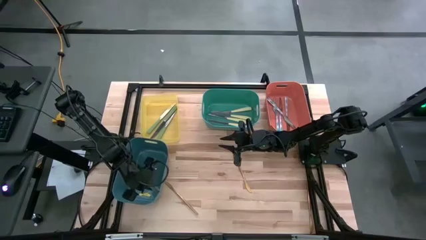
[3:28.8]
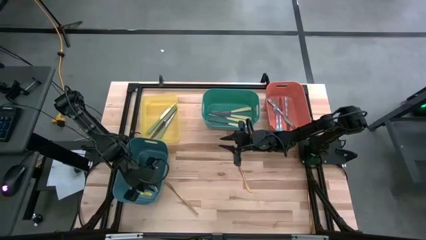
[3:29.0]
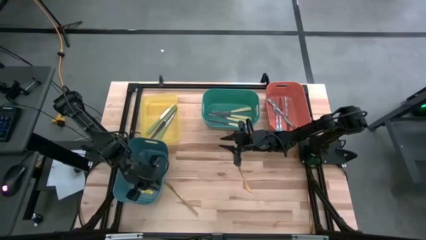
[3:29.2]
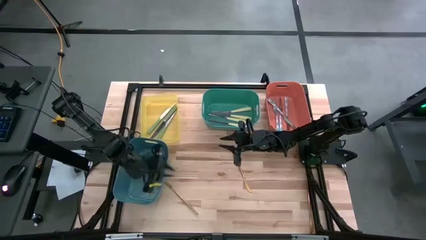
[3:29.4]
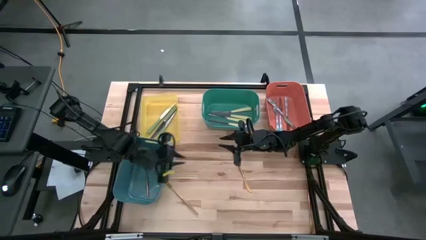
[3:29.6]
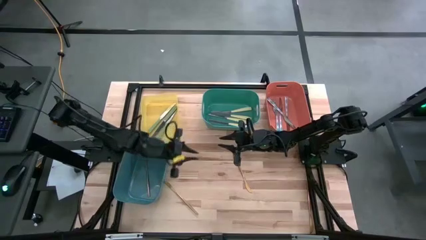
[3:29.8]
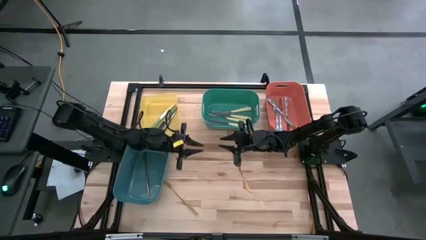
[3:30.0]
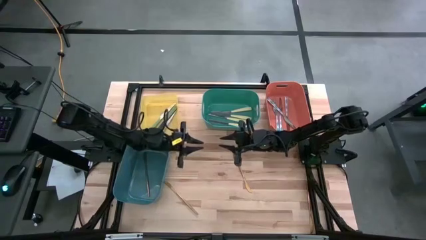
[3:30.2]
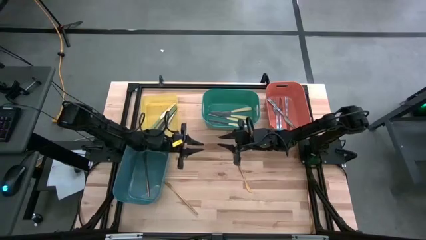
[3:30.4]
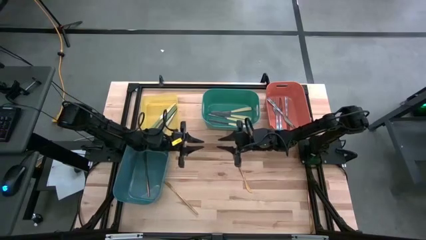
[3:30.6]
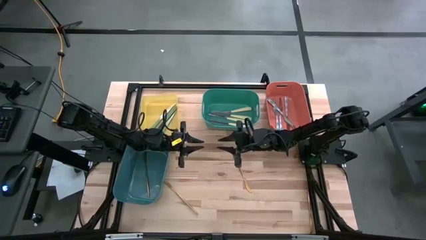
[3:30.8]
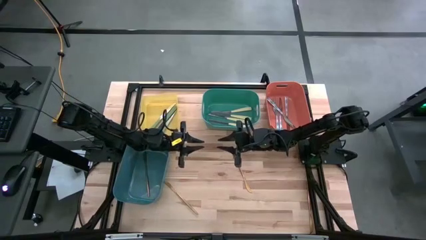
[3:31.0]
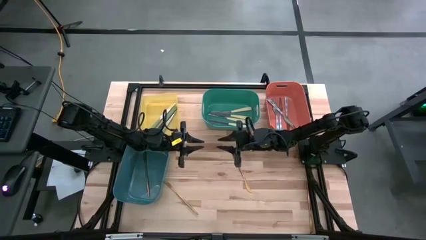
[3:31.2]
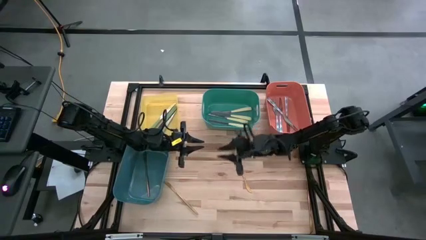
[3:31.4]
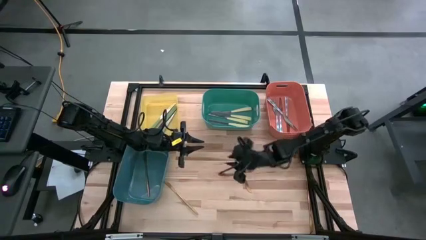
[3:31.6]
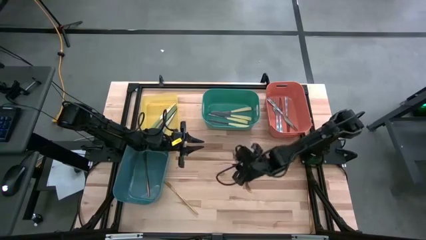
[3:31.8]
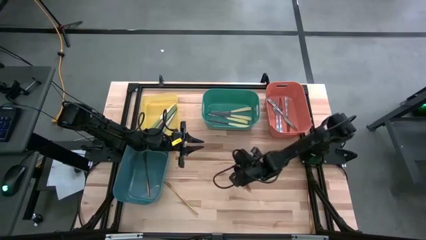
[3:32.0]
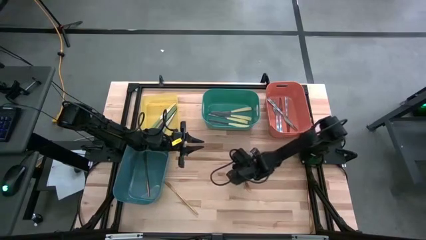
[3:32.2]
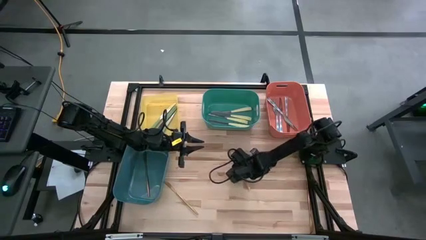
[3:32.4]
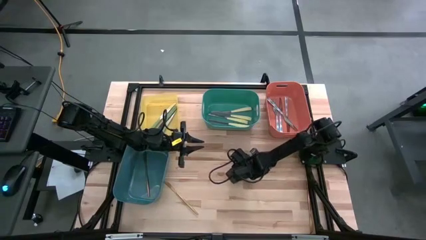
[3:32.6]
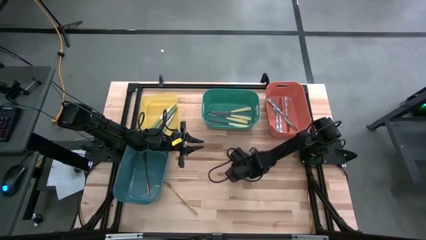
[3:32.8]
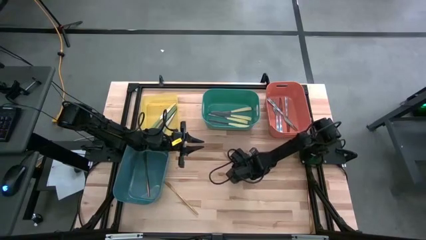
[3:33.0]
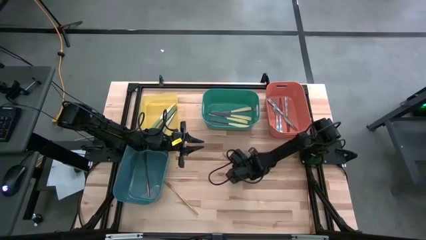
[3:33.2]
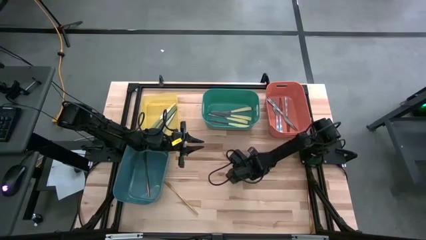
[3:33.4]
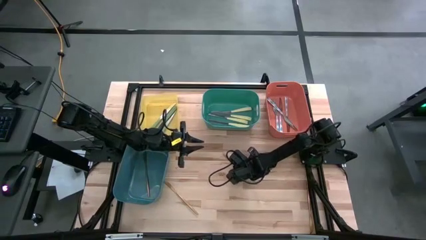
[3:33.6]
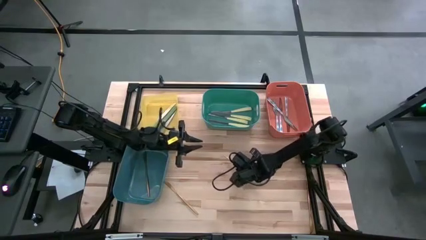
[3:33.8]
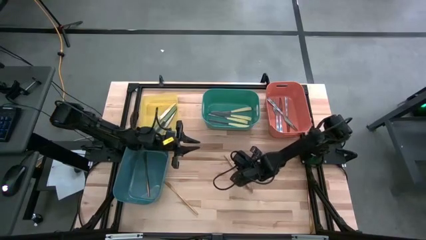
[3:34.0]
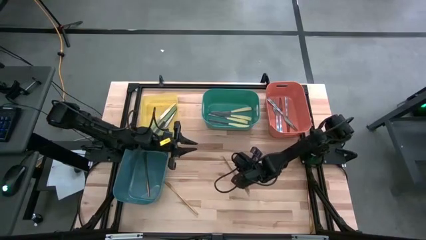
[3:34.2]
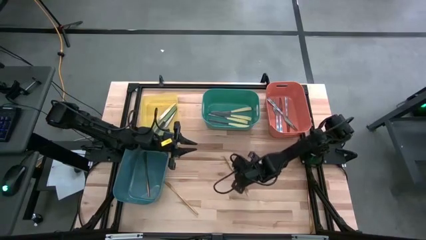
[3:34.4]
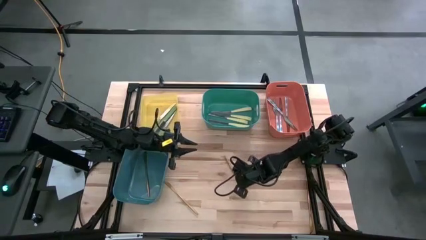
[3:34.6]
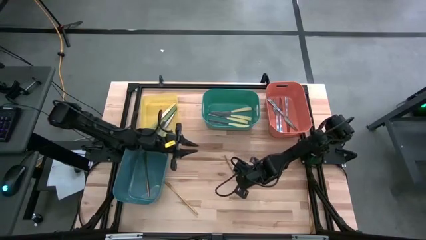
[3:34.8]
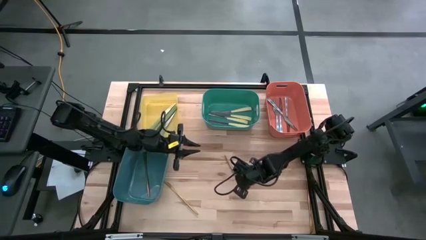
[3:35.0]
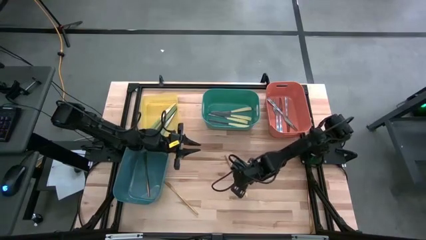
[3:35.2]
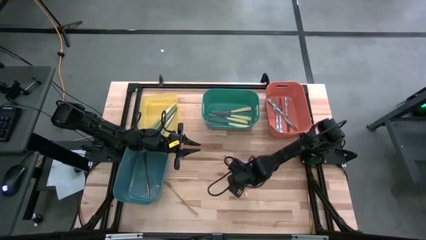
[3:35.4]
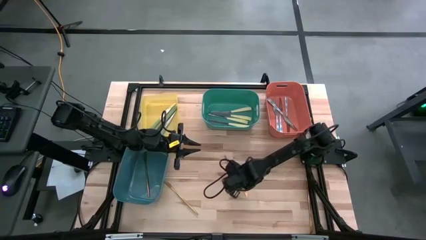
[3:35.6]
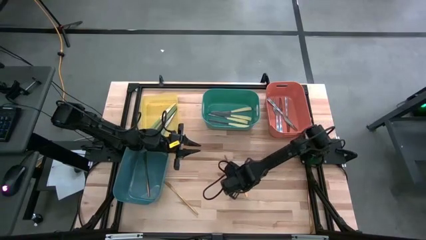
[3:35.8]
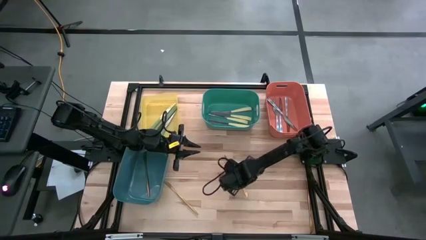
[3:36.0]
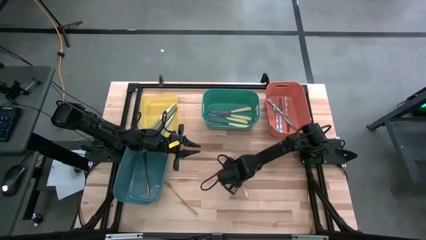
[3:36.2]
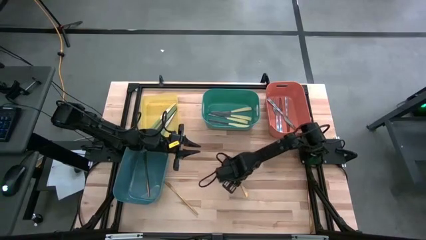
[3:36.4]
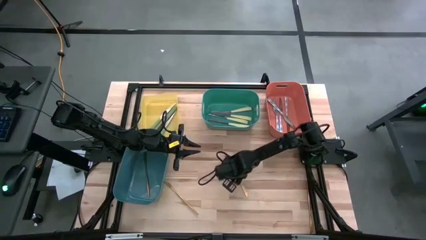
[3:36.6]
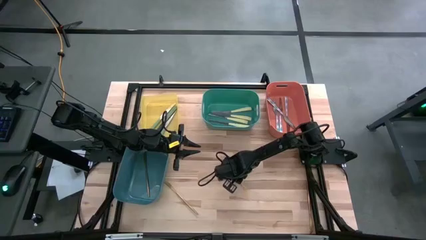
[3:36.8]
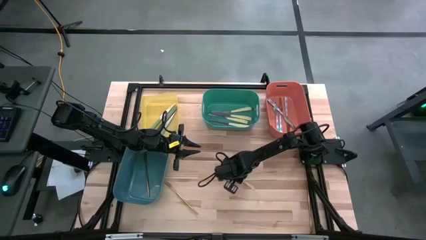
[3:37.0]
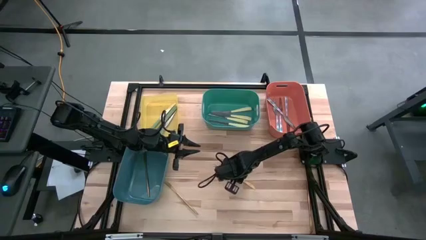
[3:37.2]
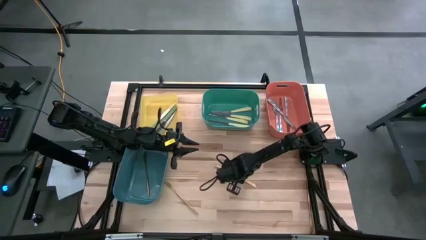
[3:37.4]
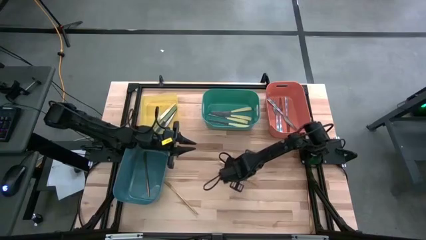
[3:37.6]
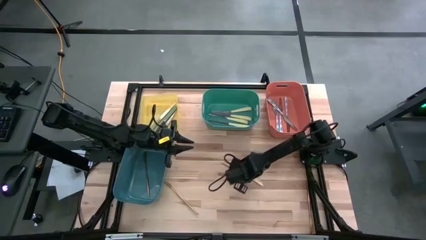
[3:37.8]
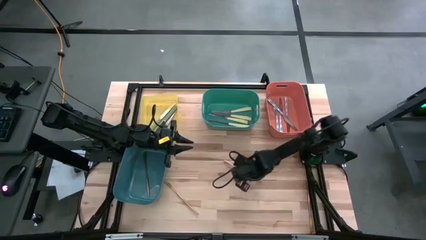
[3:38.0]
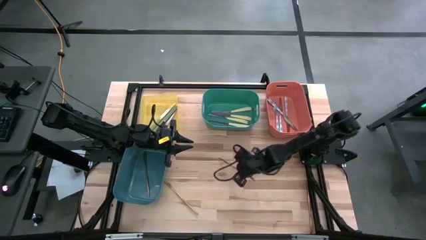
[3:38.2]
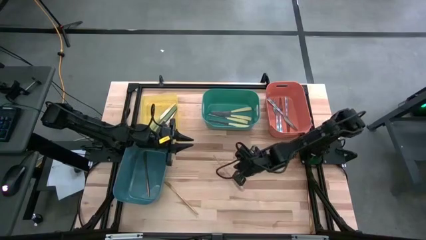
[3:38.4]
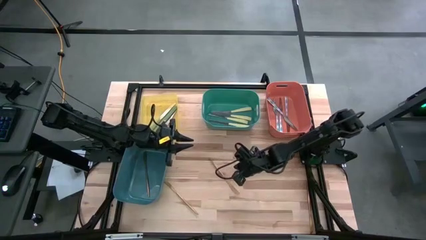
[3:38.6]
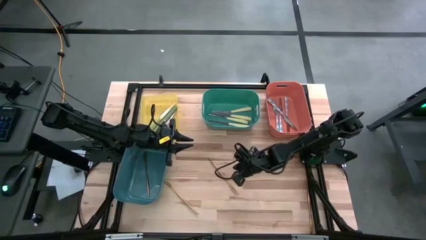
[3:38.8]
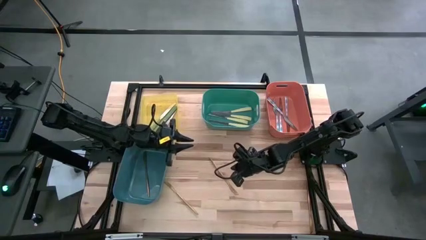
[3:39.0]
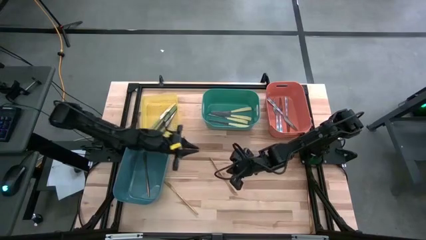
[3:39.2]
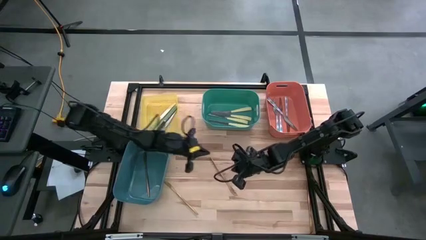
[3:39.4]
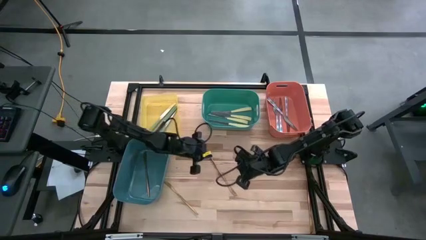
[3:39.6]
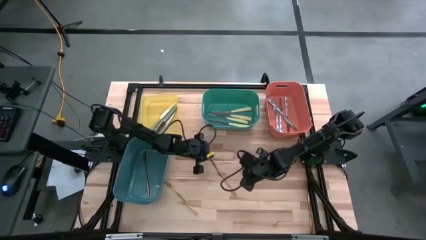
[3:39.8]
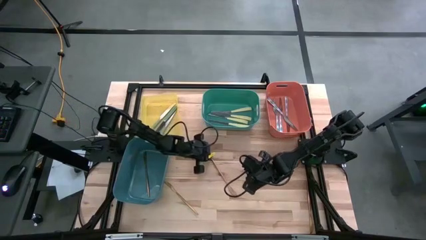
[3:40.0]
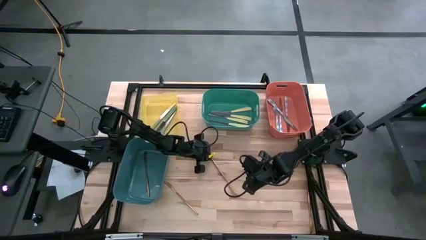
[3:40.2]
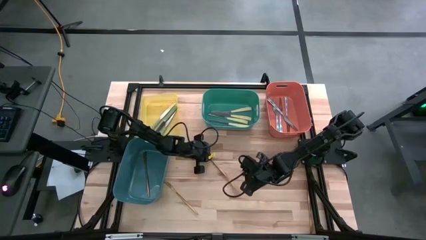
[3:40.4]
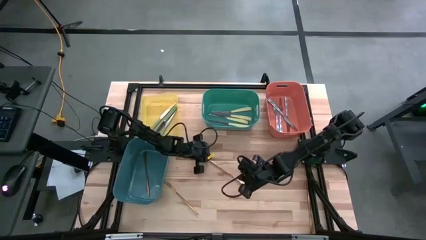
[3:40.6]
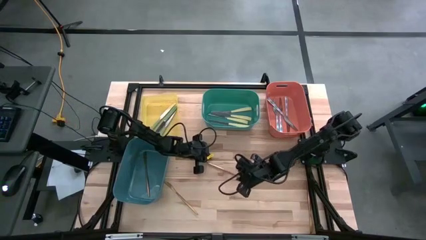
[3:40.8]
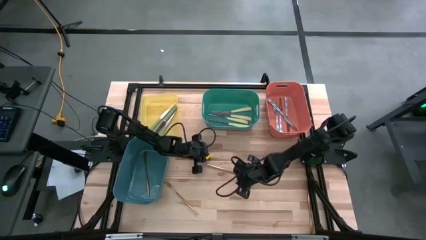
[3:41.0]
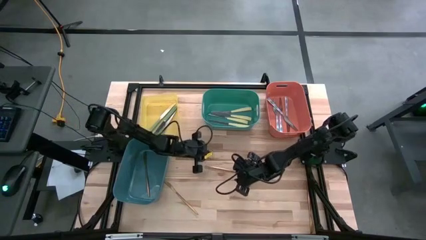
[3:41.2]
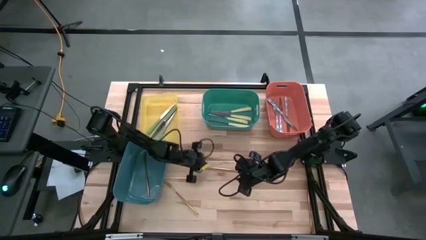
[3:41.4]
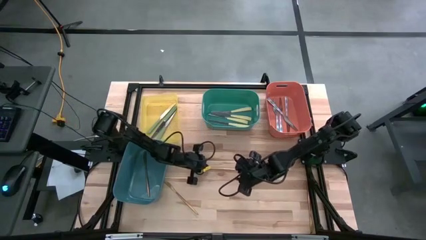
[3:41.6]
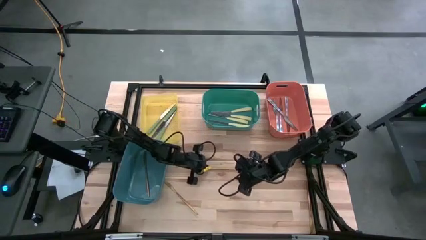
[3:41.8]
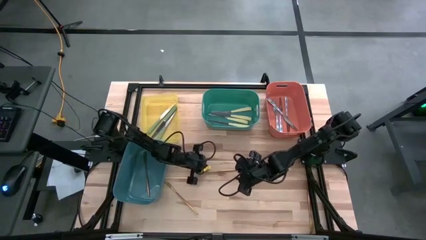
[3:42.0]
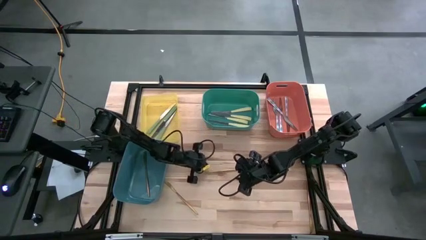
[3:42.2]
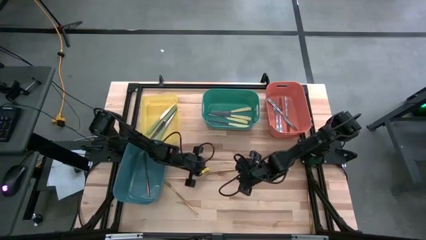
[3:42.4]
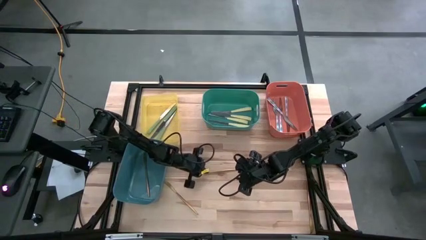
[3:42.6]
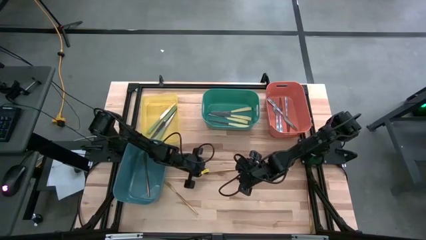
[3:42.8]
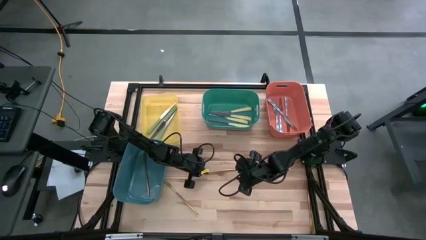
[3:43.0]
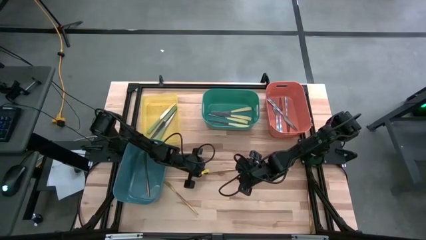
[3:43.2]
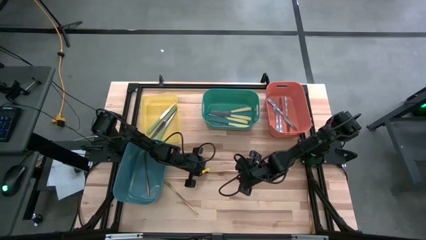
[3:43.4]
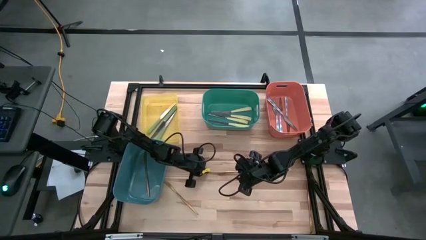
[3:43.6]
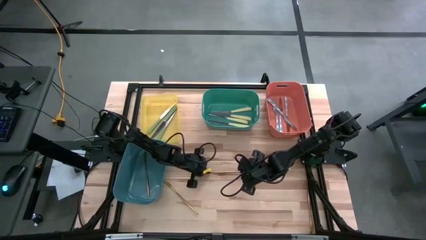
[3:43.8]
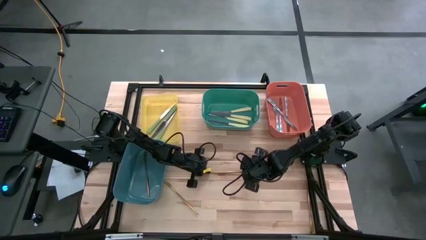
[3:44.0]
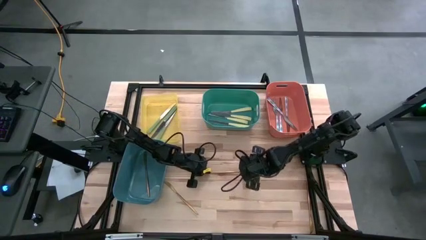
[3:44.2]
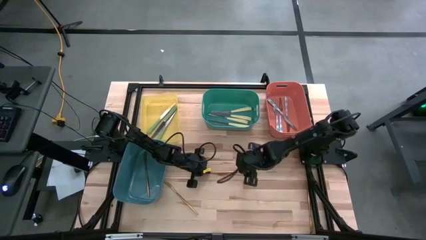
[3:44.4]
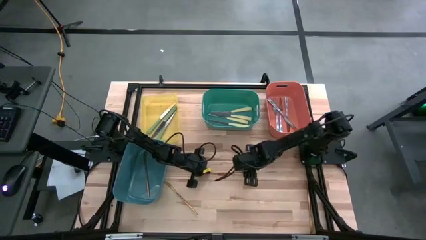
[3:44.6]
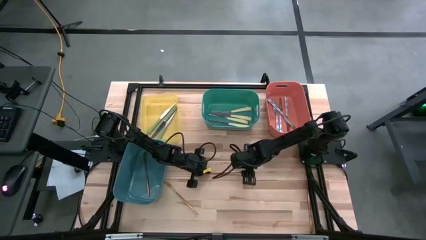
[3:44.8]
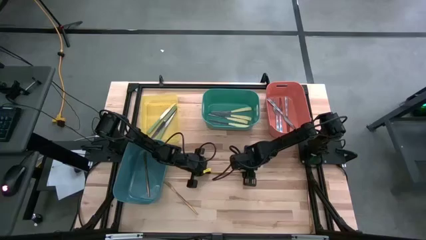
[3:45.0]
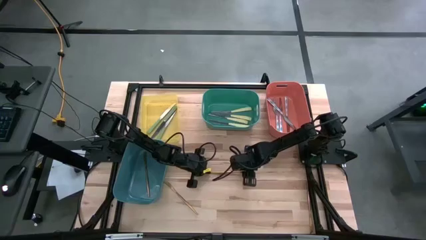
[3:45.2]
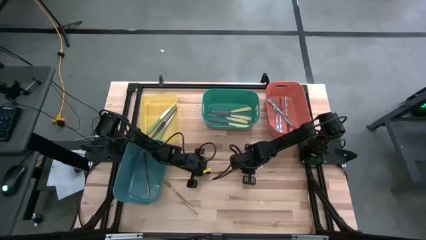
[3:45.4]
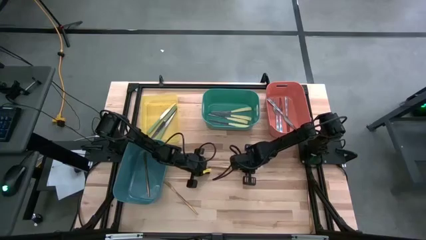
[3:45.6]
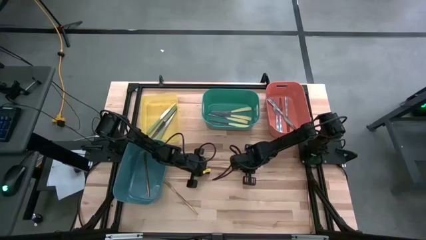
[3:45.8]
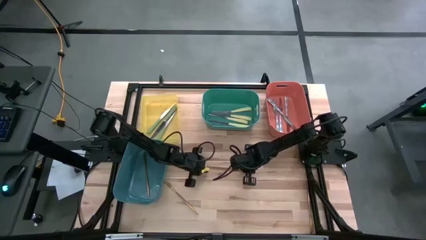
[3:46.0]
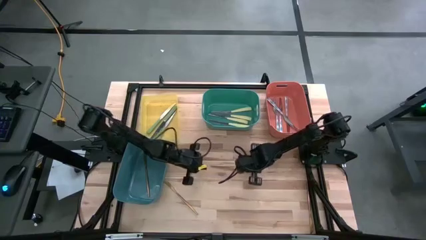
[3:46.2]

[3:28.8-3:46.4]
Task: Sort silverware by color (type)
Put the gold knife into the blue bin
